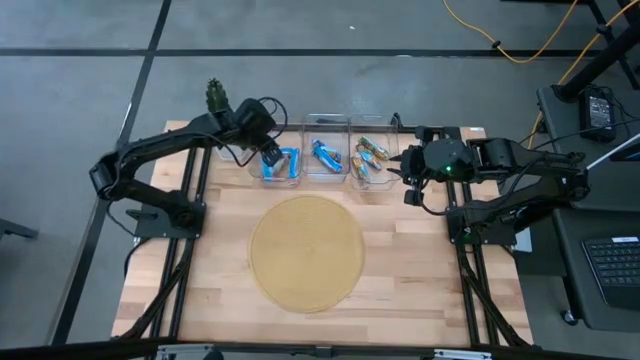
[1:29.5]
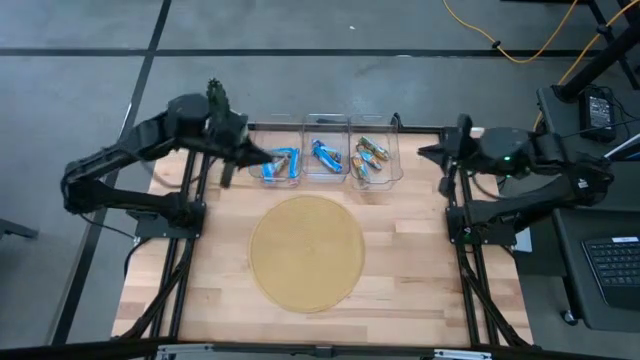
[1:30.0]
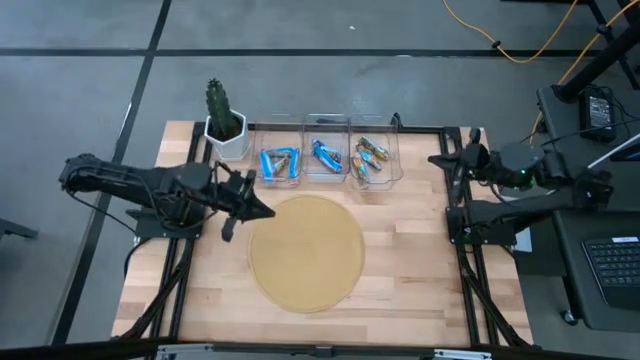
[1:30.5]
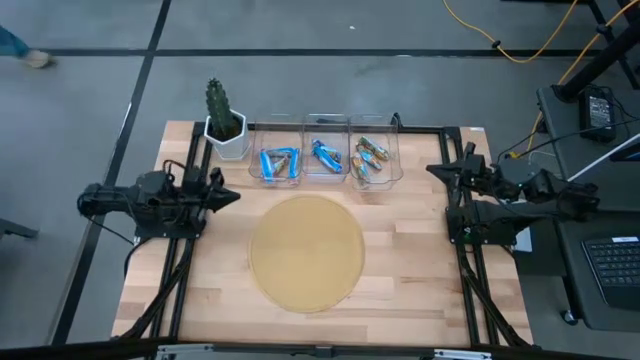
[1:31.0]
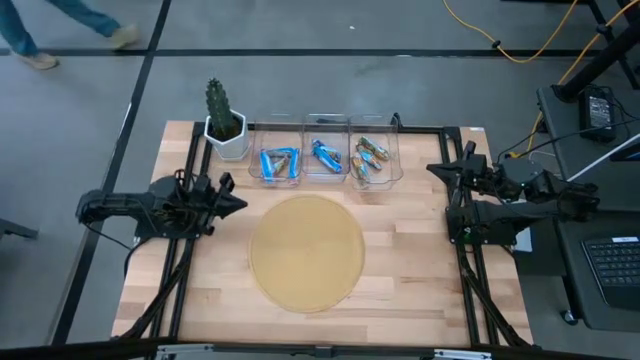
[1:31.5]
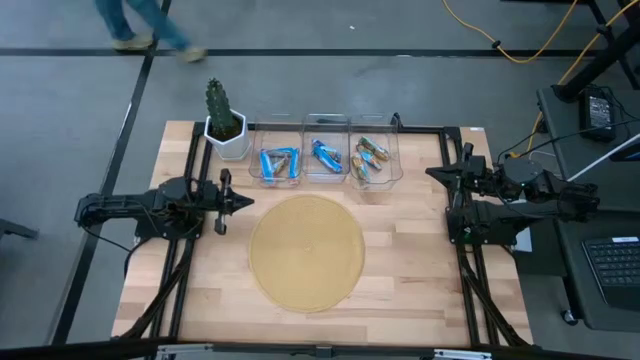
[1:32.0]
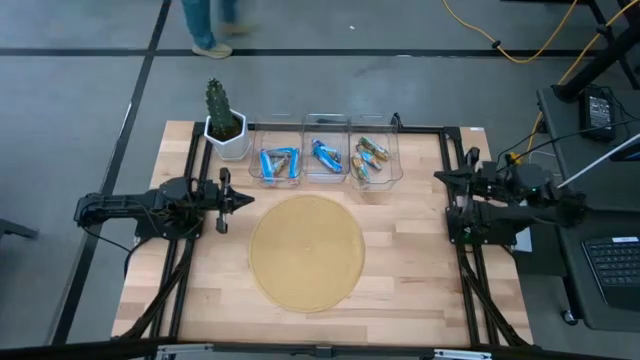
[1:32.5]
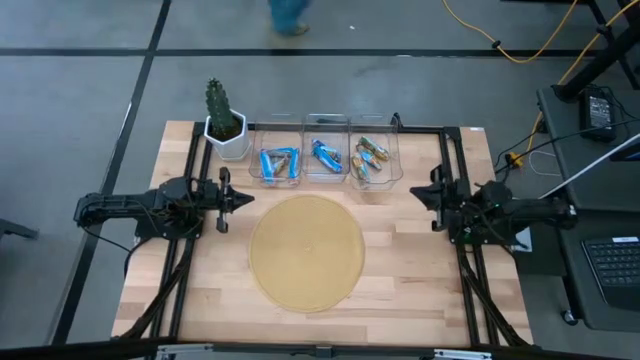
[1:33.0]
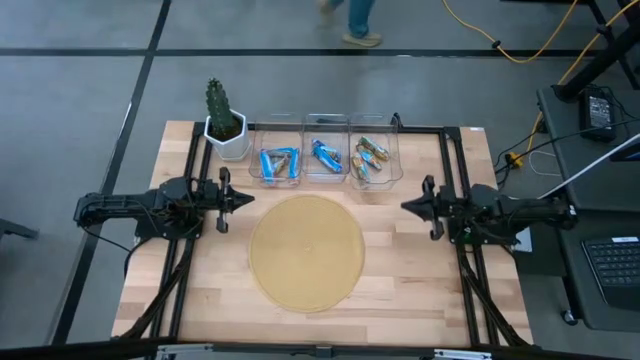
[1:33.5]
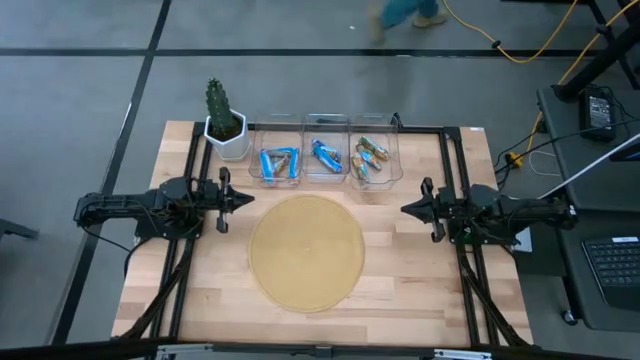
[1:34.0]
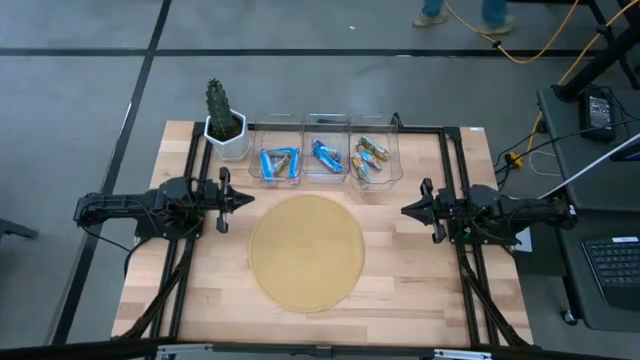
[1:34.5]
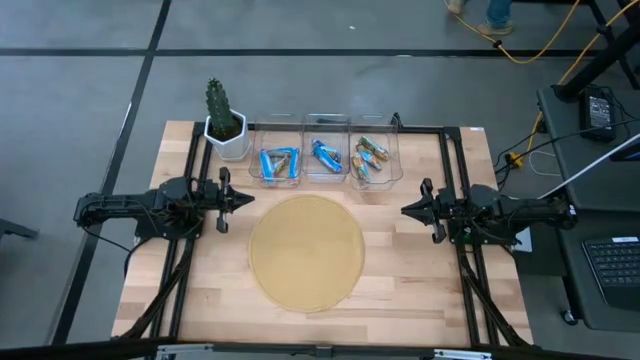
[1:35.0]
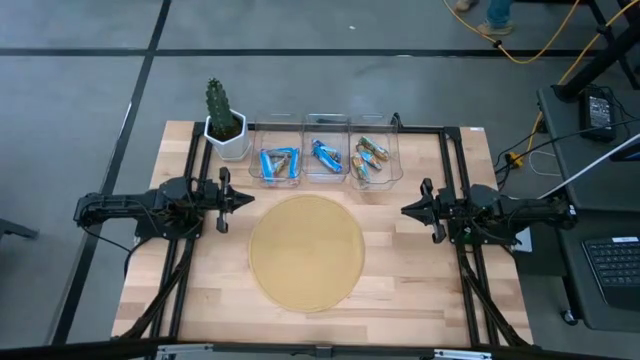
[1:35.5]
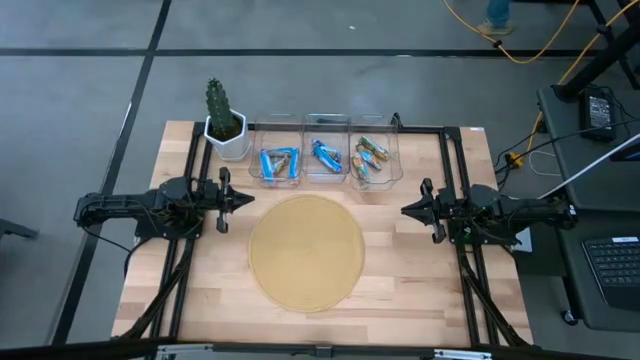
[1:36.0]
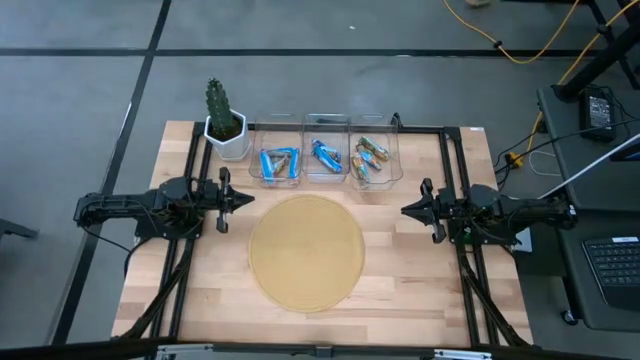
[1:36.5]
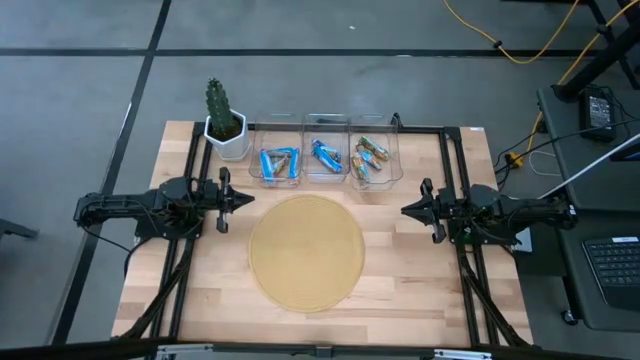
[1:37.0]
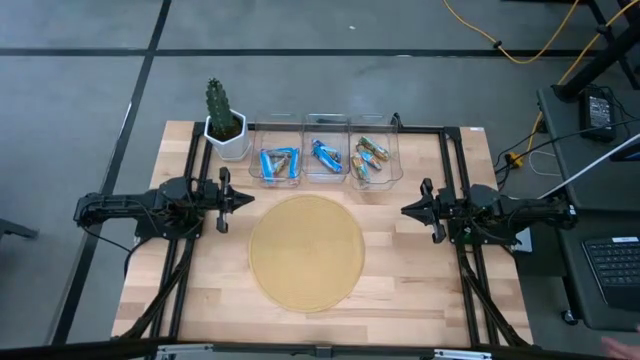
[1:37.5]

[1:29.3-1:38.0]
Task: Pick and place Granola Bars by type
Return to Home Position

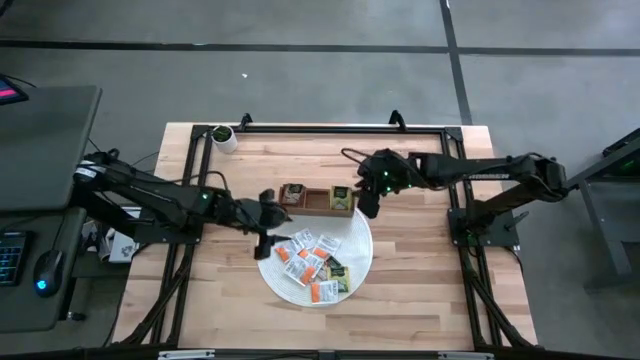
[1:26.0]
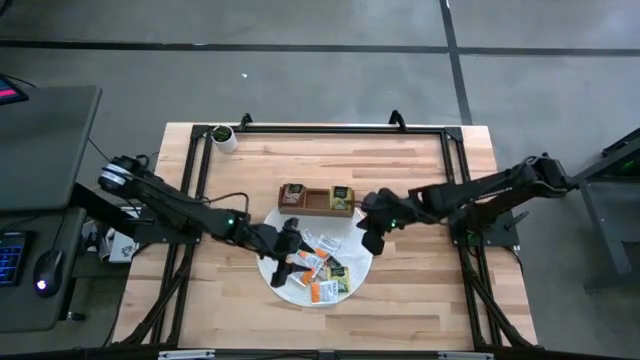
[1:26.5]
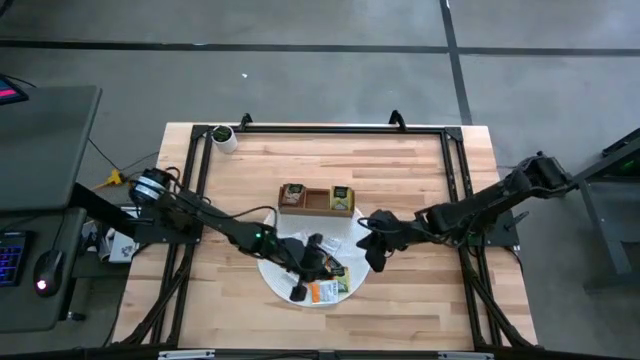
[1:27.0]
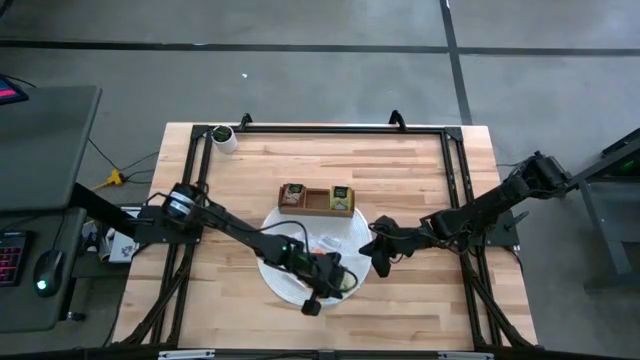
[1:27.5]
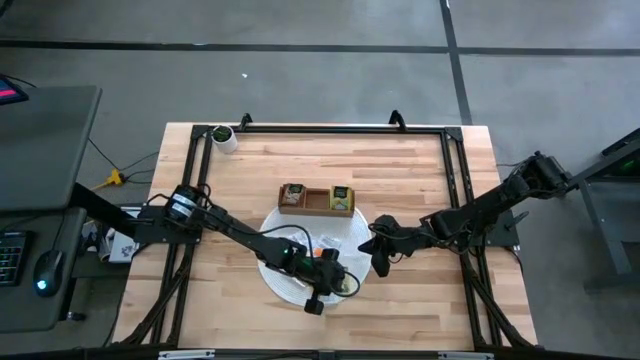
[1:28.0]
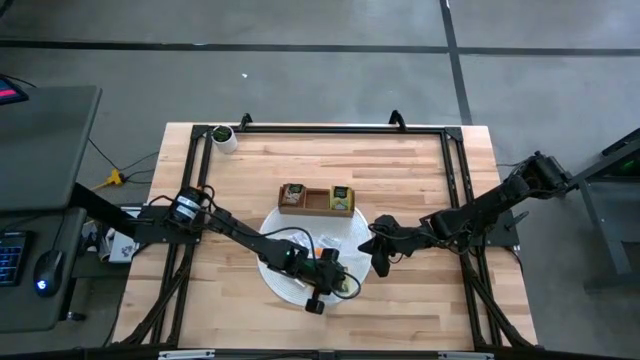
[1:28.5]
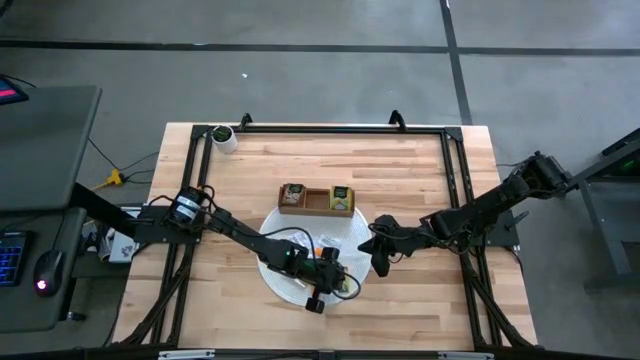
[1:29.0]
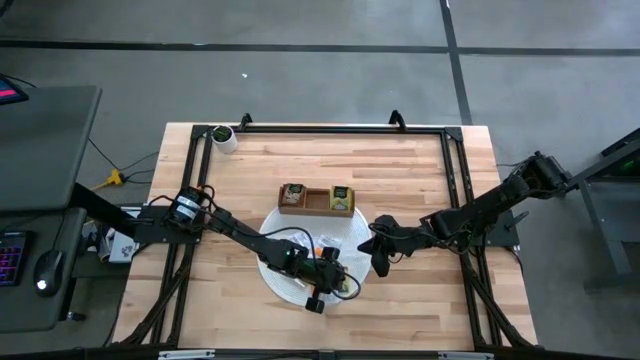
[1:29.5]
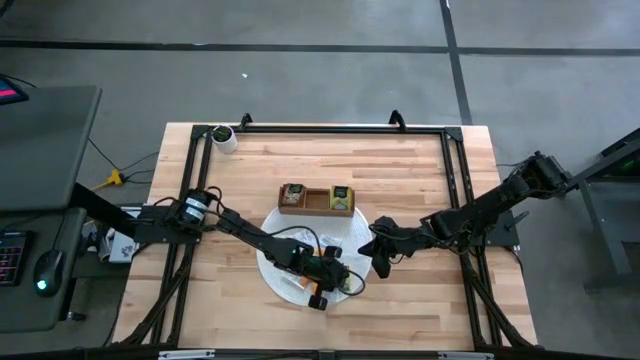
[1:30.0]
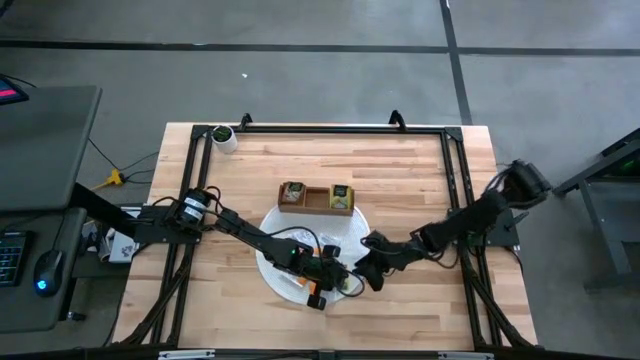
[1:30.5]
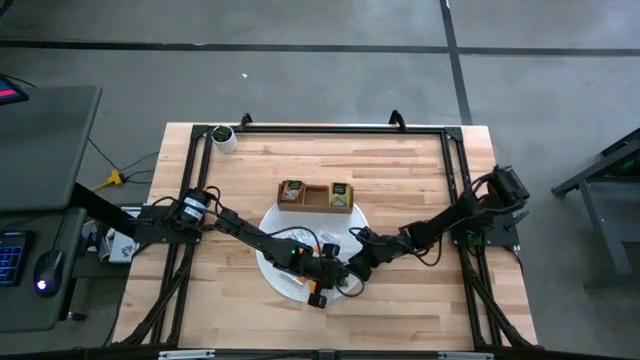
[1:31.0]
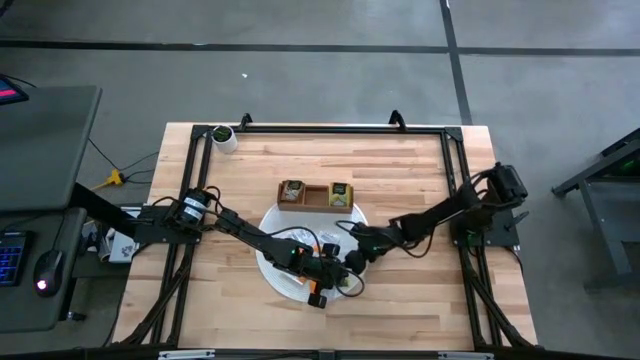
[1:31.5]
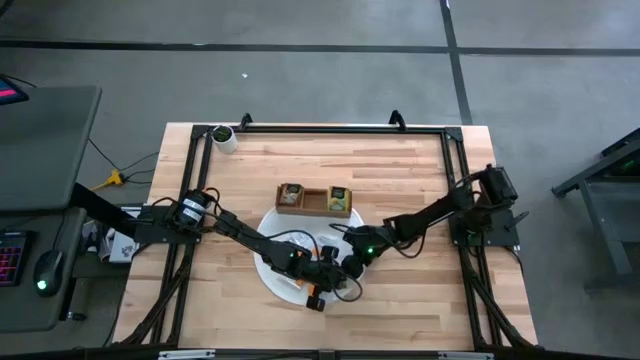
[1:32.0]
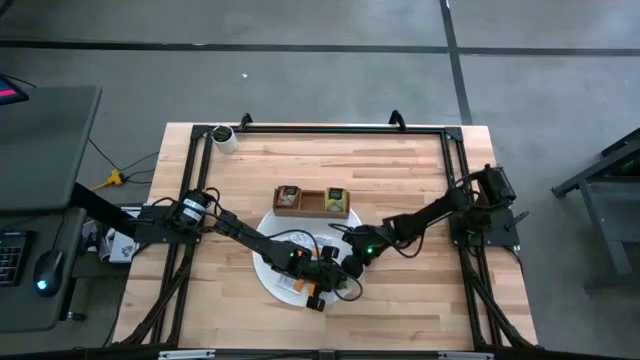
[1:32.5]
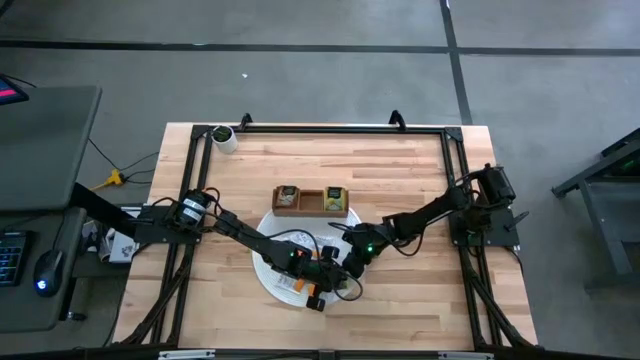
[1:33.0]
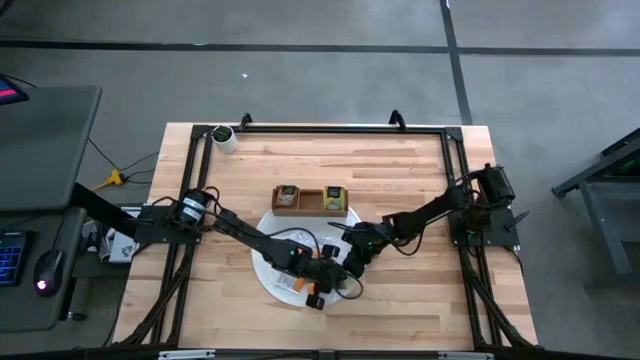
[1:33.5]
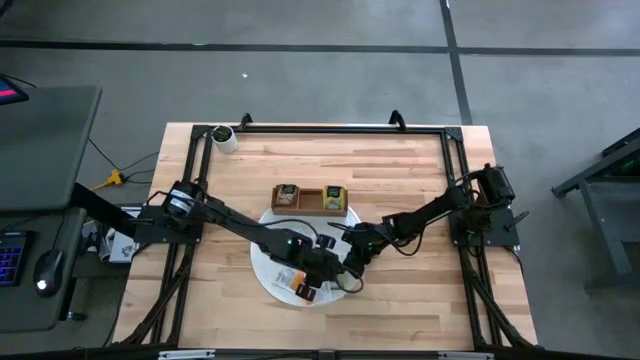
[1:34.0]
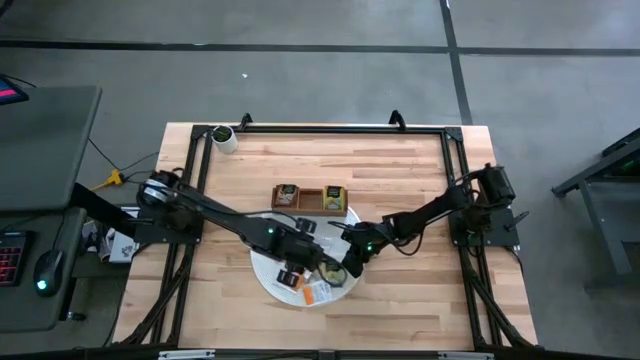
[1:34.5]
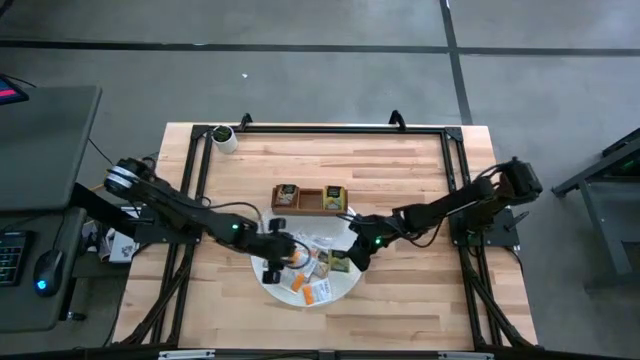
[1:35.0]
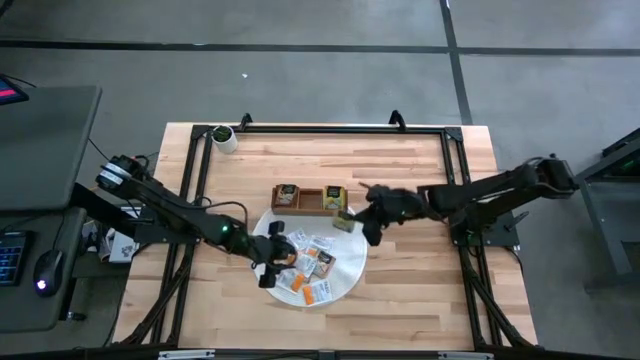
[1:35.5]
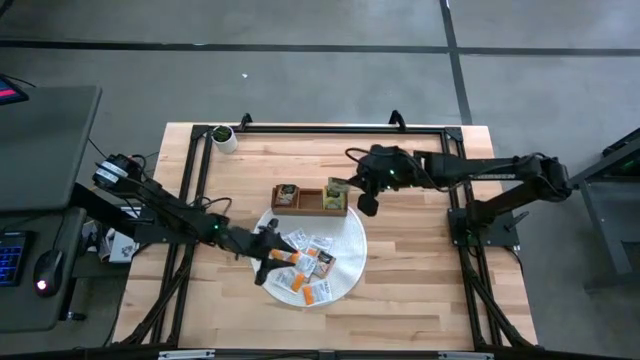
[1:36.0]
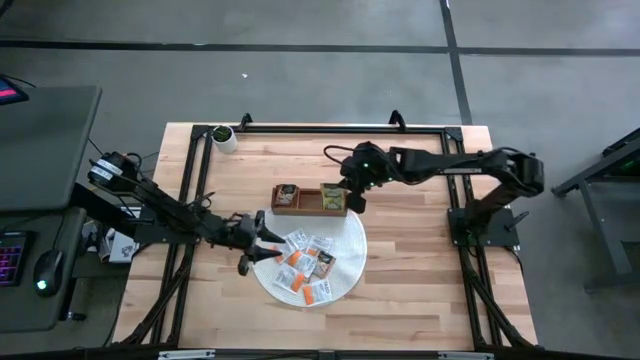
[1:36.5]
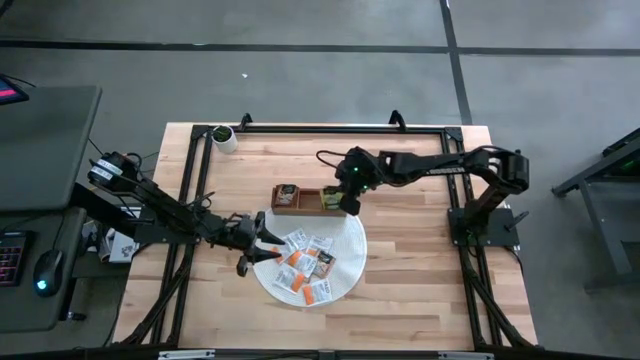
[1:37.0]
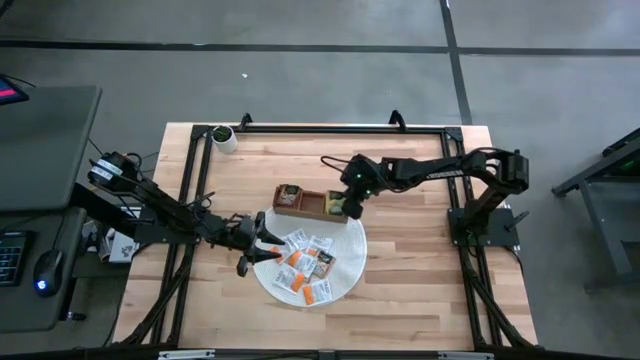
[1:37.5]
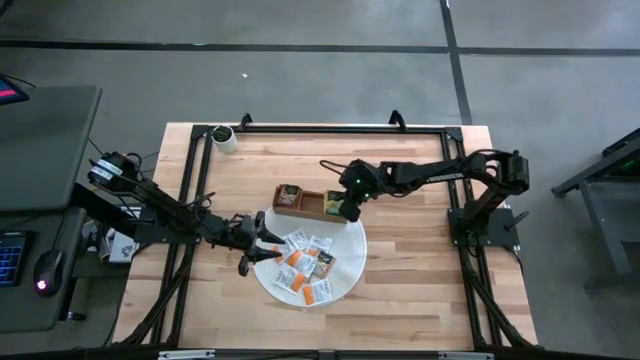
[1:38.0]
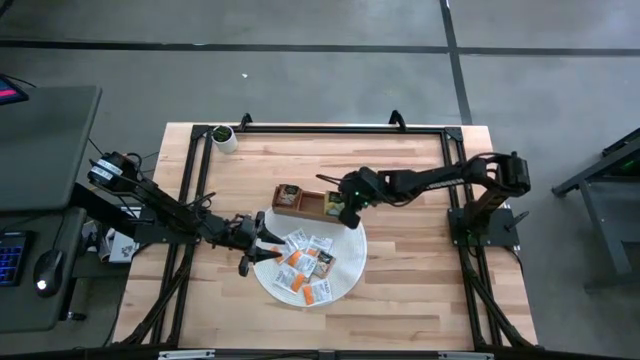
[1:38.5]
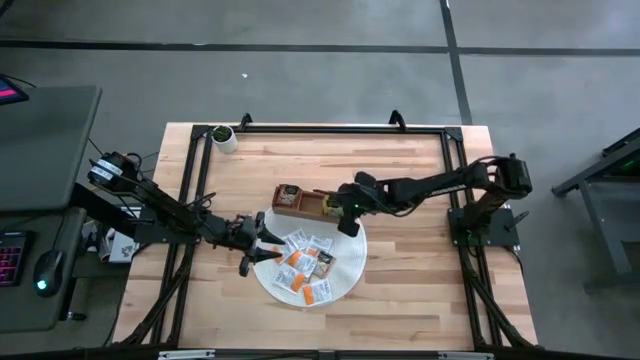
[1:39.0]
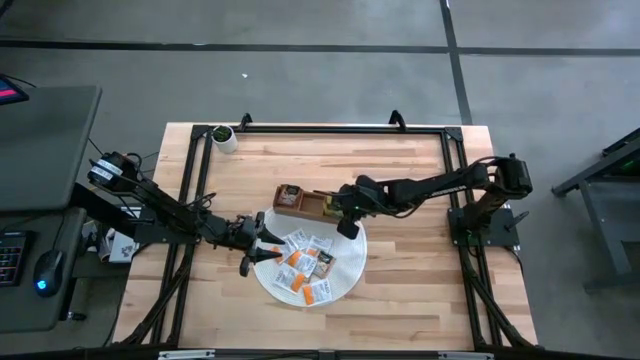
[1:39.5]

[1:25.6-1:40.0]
Task: Pick & Place Tea
Put the yellow tea bag into the right section of the wooden organizer
